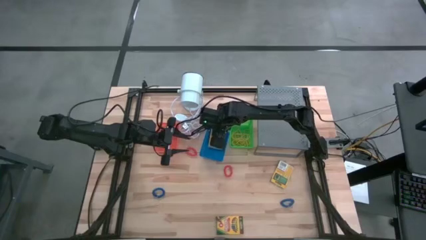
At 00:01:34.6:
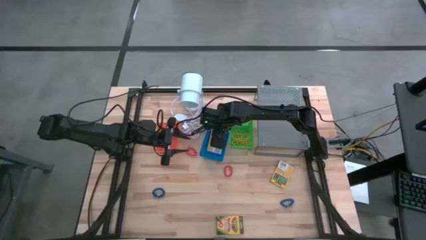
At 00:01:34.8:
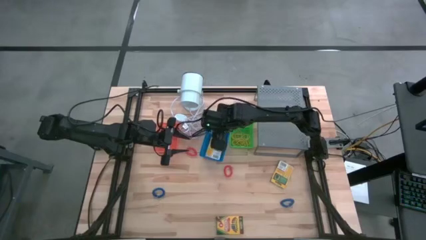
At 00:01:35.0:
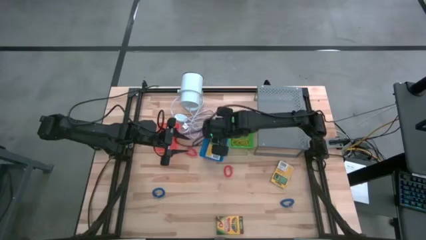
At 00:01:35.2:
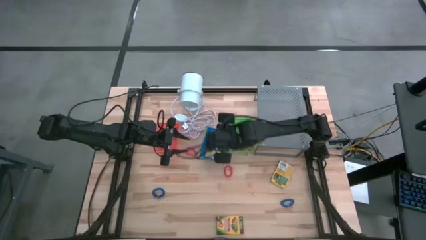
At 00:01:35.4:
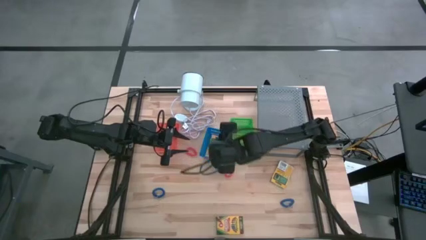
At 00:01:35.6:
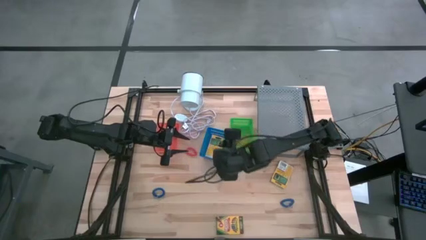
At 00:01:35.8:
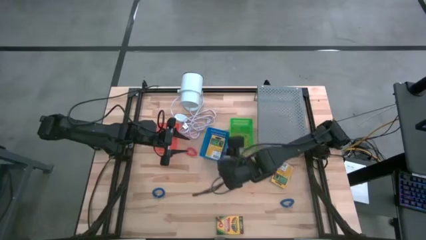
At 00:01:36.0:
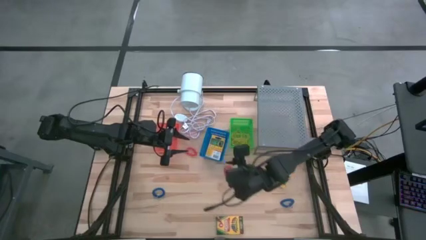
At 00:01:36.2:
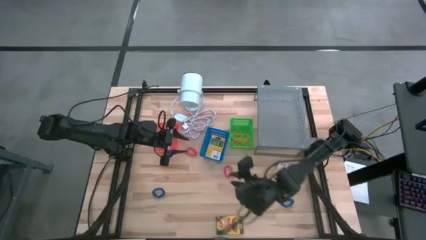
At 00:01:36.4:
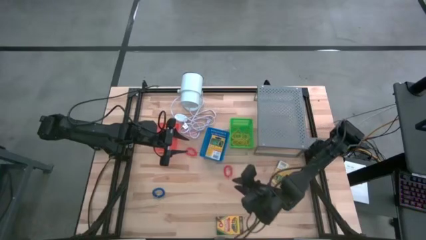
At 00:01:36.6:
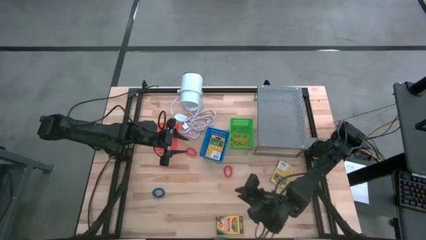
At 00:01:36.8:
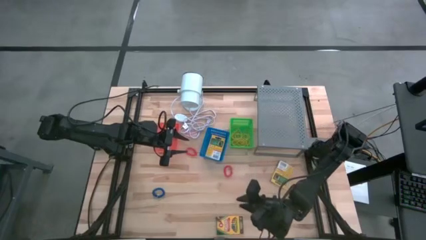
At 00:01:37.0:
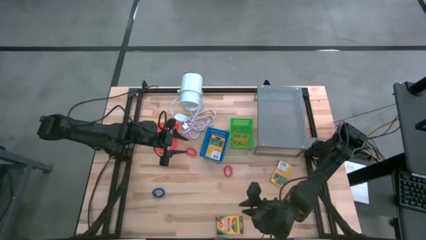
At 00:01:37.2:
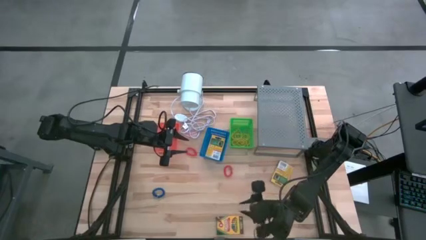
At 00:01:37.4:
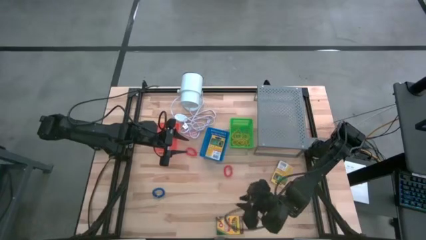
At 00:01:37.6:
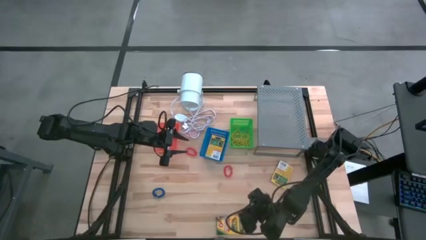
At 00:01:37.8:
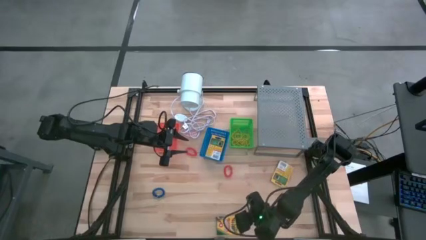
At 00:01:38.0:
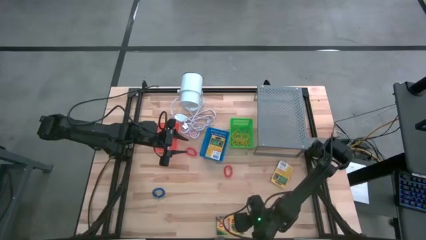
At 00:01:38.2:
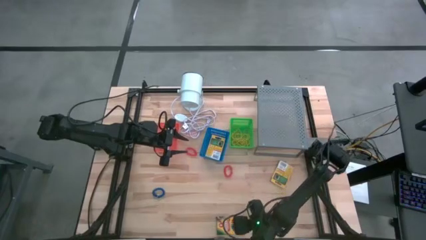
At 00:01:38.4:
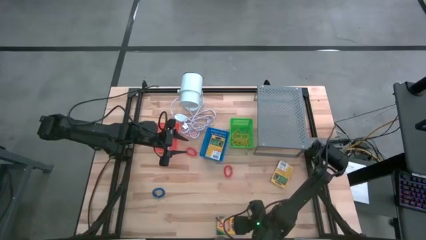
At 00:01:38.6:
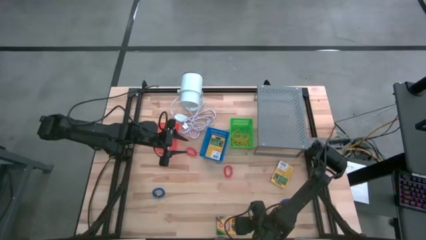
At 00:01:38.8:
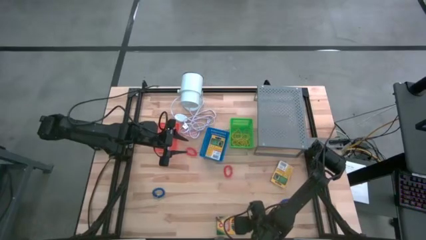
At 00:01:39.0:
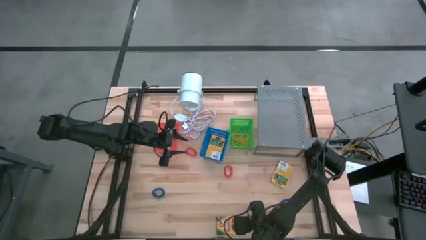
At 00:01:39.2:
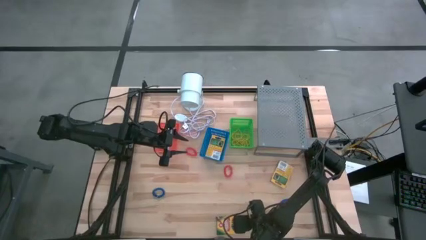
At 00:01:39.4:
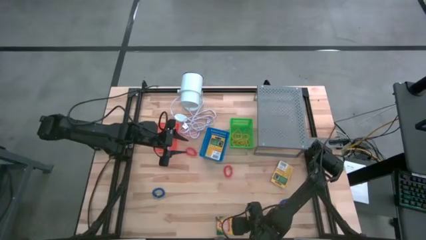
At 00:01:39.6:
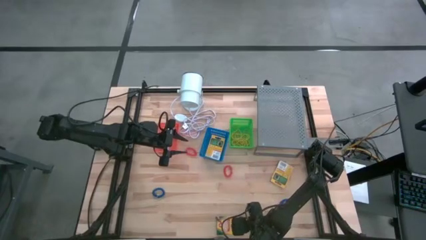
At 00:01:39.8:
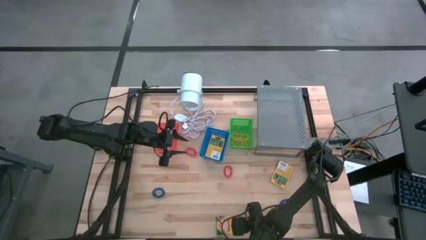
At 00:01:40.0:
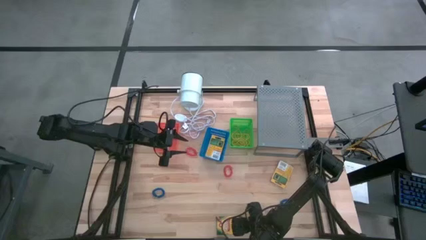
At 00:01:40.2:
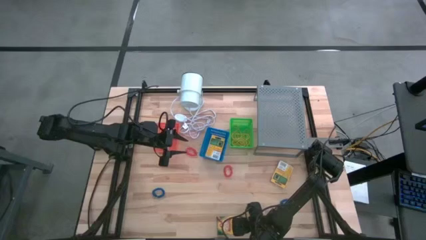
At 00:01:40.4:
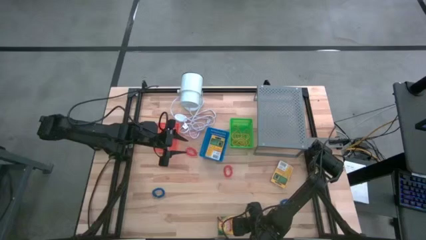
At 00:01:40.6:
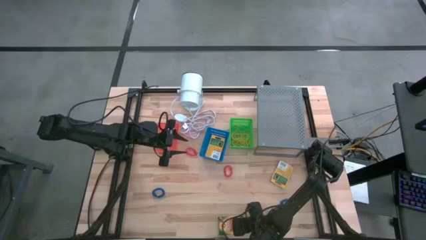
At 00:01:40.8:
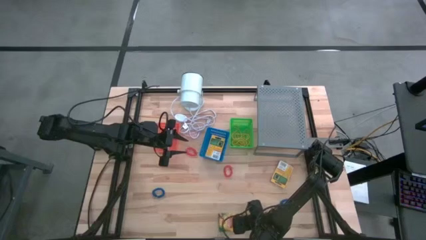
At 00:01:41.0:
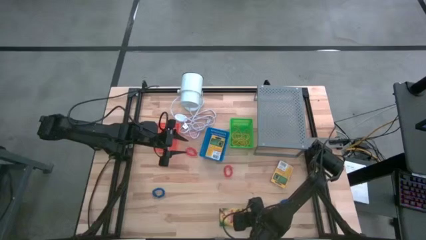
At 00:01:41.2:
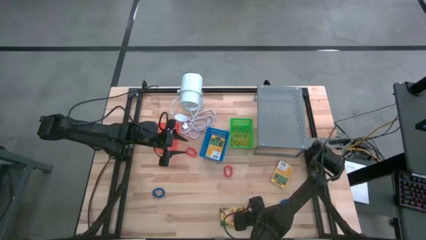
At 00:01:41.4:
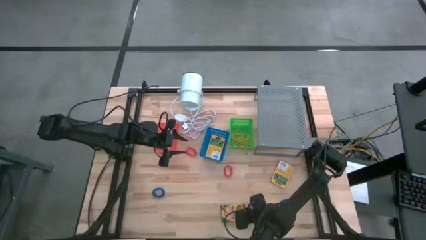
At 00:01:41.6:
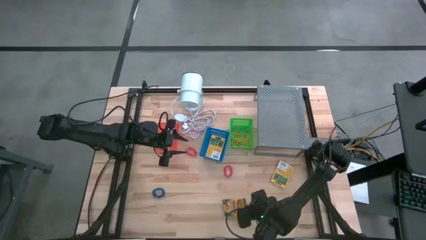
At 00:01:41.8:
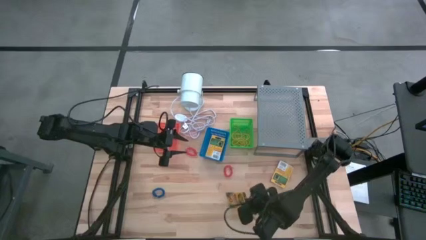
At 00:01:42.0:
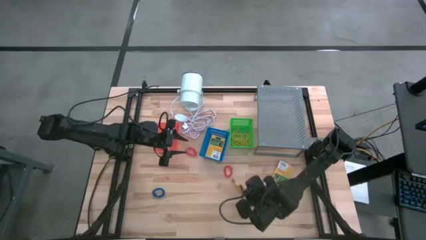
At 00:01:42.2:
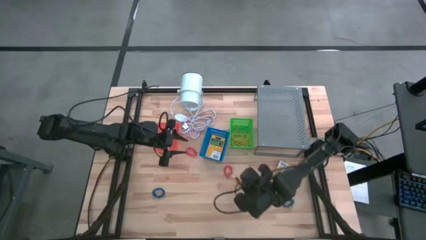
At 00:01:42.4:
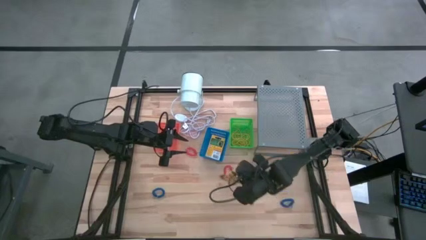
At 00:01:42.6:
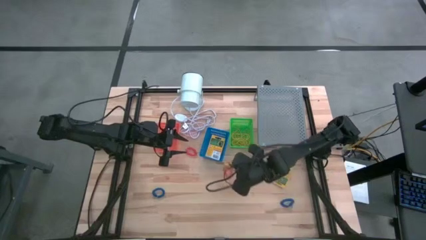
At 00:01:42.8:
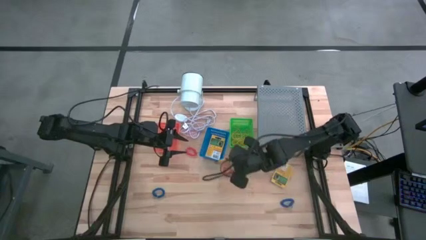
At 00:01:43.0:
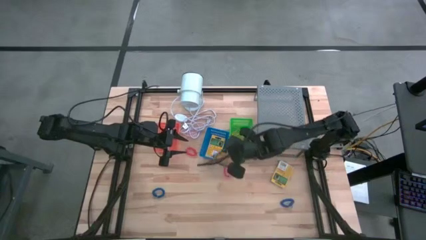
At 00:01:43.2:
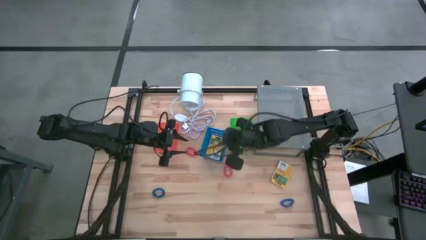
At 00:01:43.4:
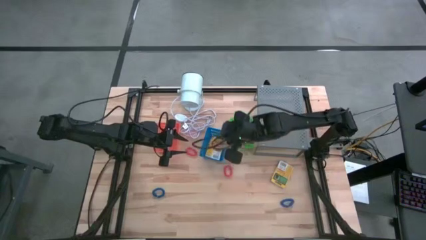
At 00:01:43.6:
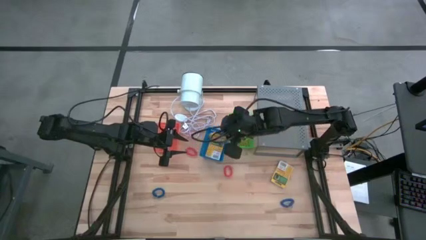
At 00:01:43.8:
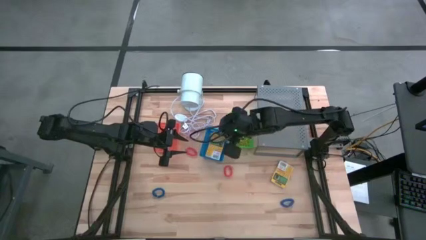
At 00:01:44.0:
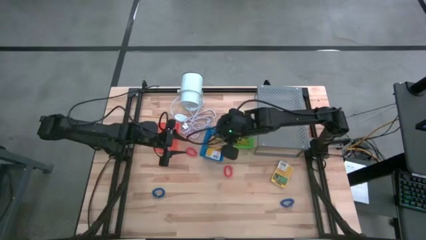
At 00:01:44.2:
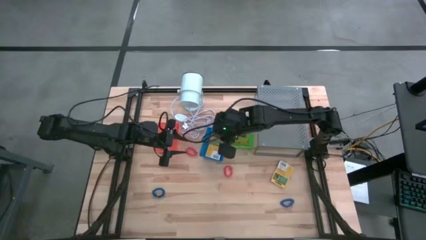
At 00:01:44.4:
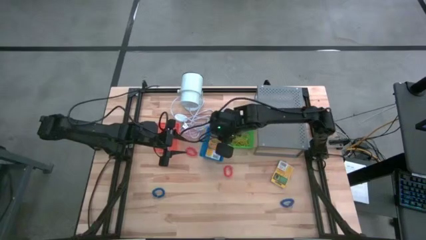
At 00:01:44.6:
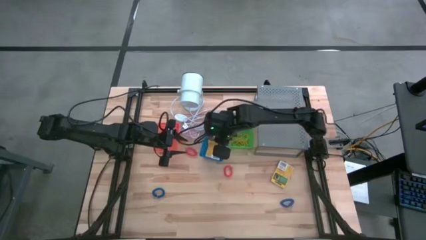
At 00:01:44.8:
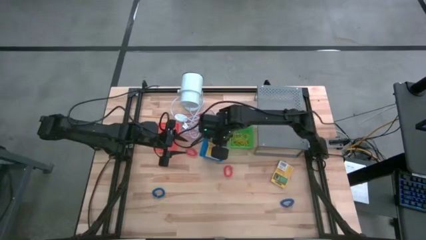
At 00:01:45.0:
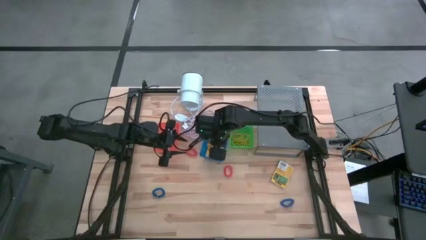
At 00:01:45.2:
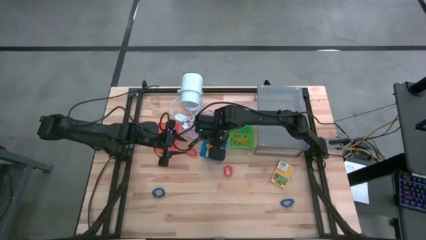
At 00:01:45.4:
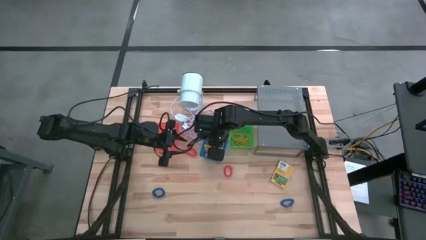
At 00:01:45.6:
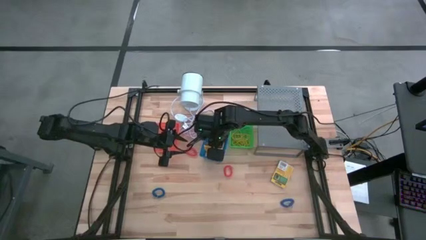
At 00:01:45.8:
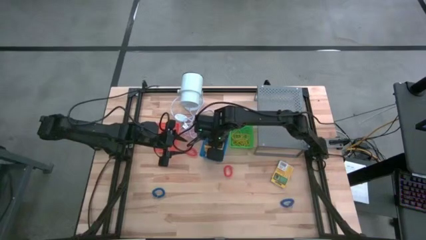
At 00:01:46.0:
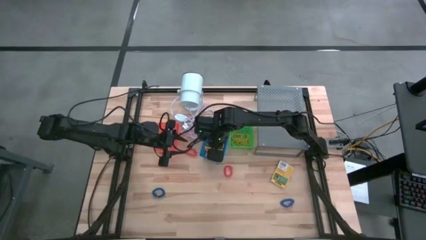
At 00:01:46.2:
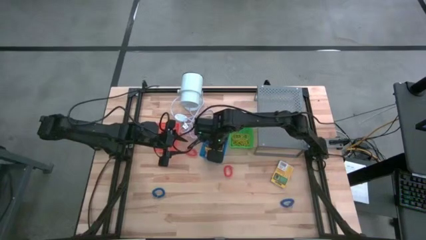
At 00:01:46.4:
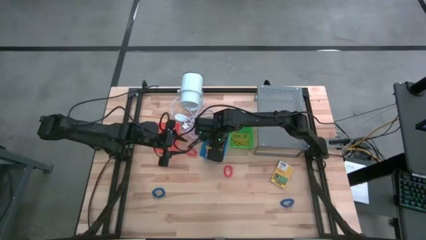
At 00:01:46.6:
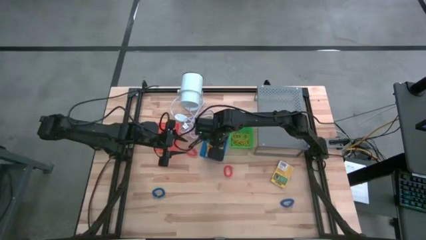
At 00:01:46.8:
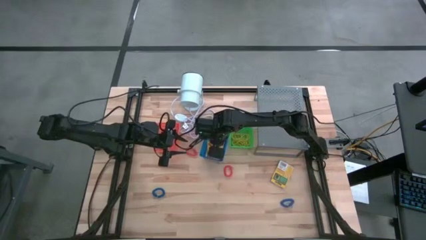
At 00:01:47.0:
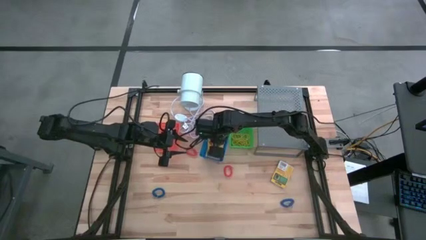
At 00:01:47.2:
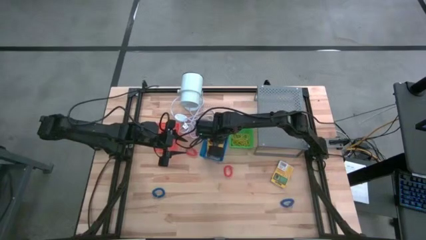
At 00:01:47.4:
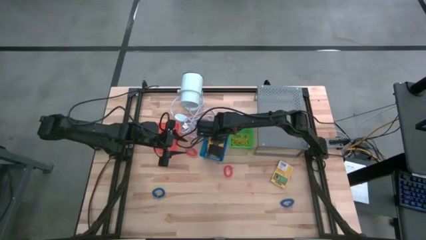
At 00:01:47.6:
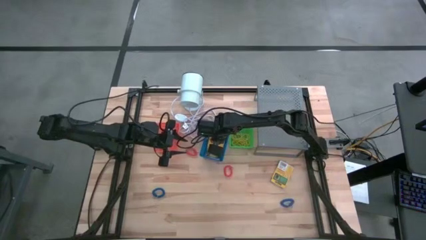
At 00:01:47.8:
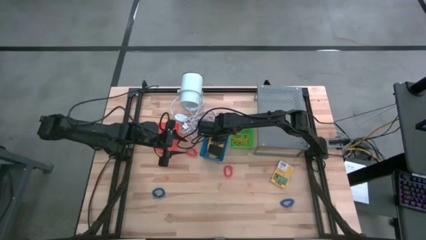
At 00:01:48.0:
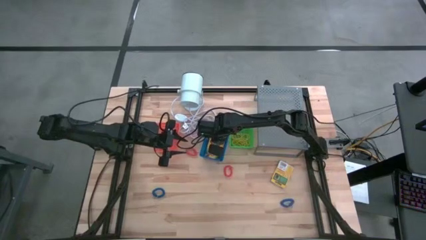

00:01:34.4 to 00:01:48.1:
Task: Pick & Place Office Desk Supplies
Put the pack of crayon into the blue bin
